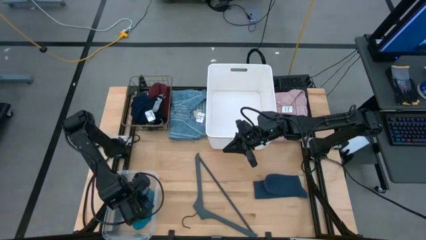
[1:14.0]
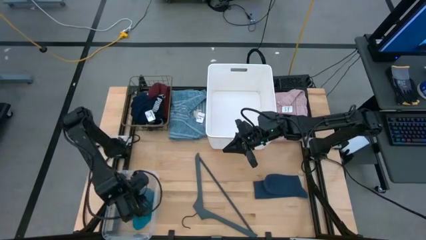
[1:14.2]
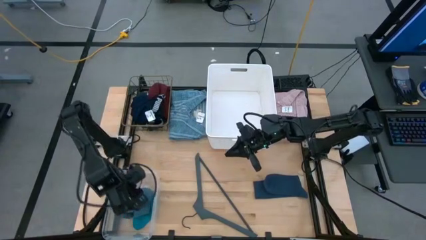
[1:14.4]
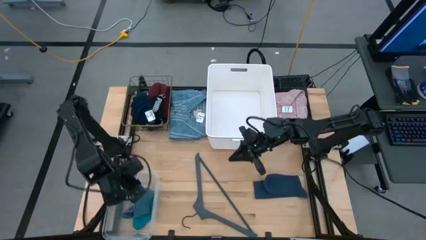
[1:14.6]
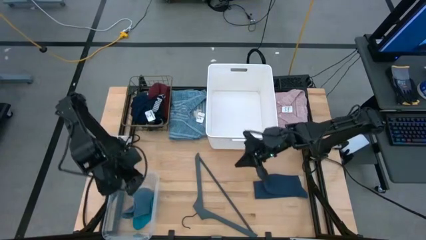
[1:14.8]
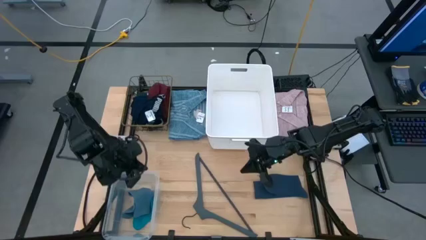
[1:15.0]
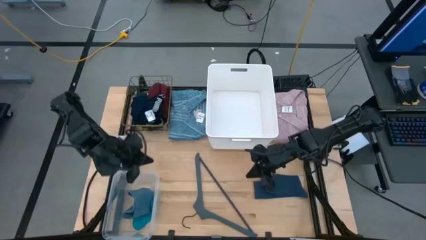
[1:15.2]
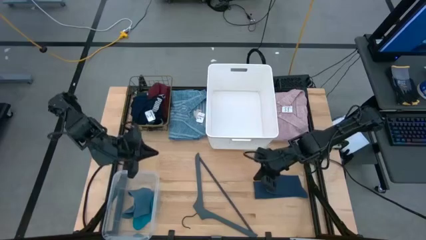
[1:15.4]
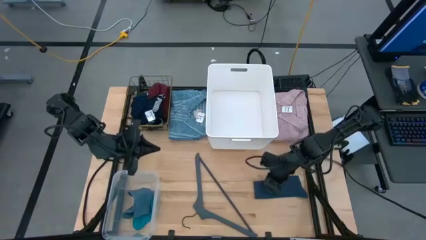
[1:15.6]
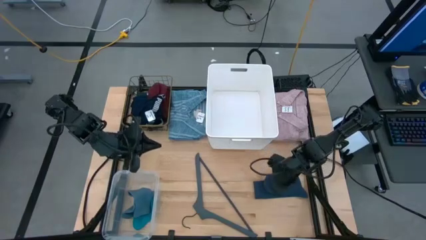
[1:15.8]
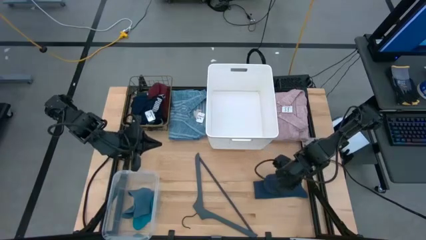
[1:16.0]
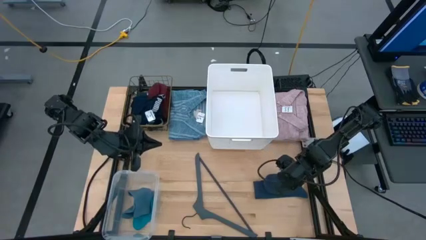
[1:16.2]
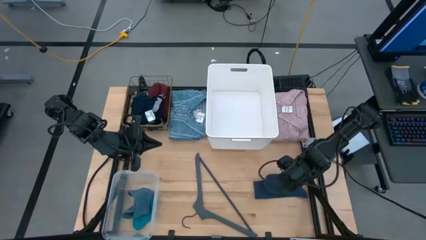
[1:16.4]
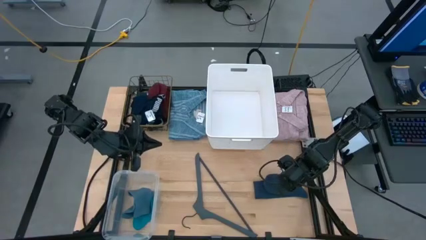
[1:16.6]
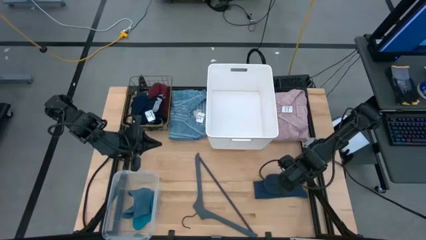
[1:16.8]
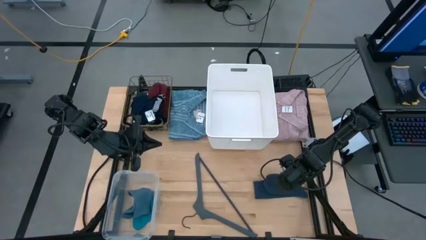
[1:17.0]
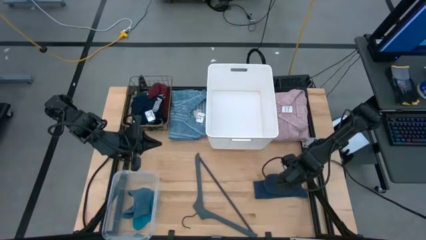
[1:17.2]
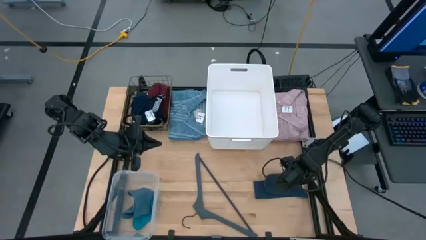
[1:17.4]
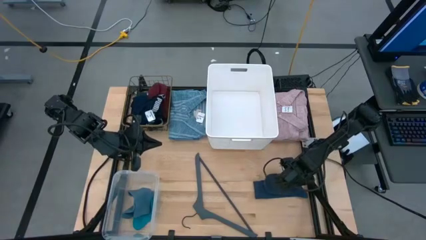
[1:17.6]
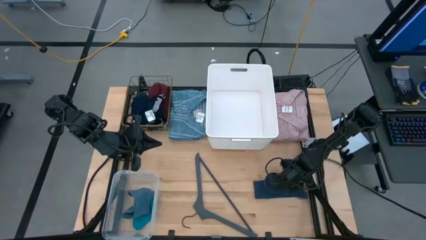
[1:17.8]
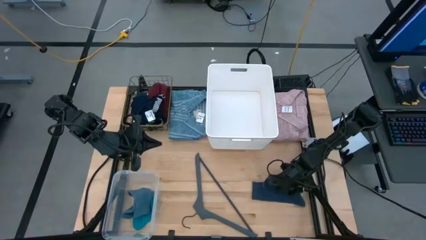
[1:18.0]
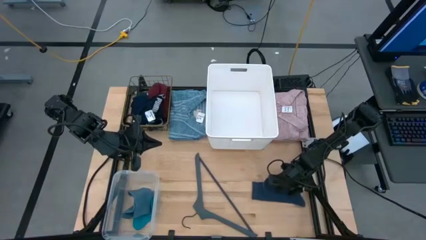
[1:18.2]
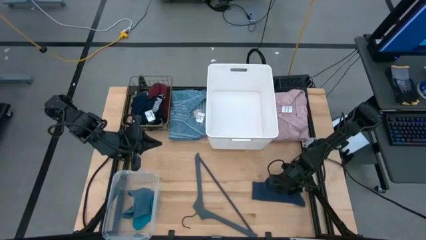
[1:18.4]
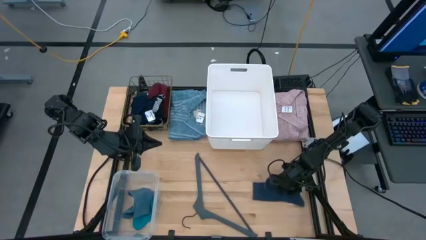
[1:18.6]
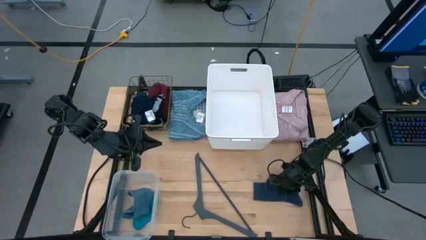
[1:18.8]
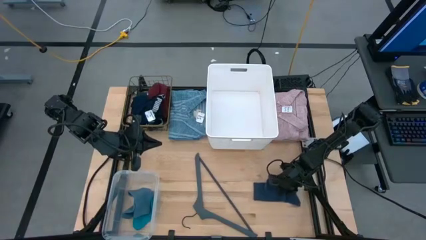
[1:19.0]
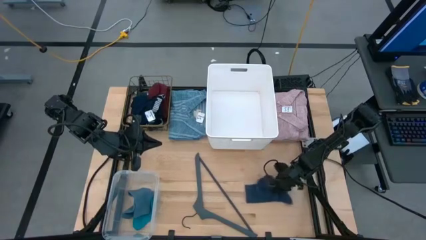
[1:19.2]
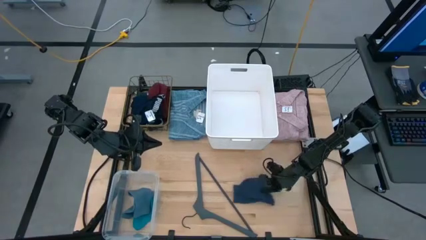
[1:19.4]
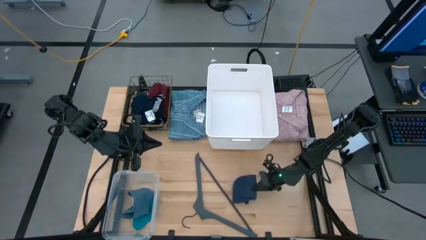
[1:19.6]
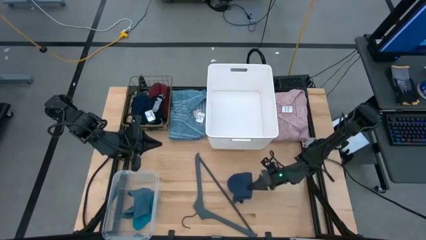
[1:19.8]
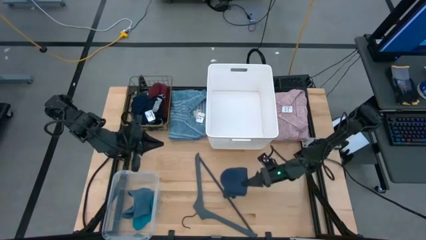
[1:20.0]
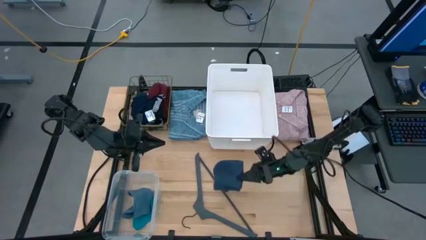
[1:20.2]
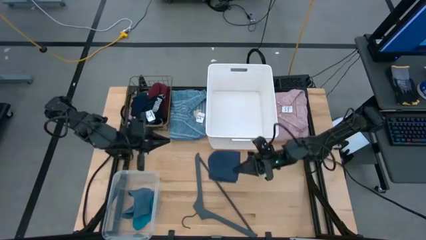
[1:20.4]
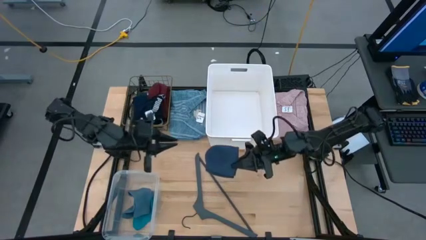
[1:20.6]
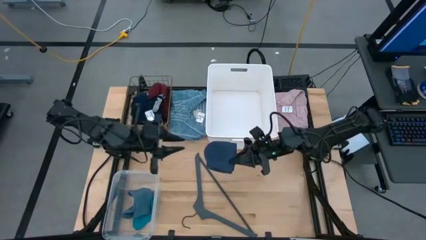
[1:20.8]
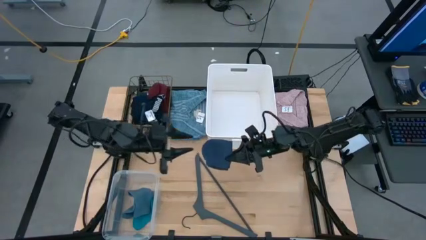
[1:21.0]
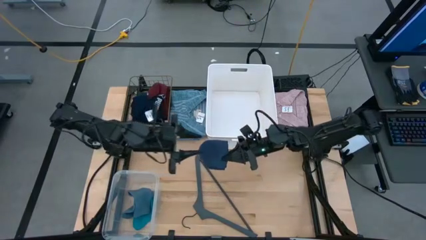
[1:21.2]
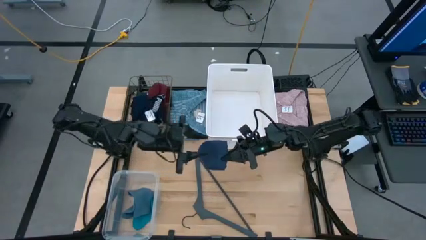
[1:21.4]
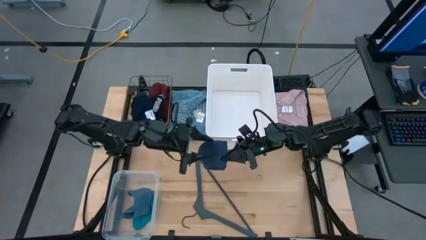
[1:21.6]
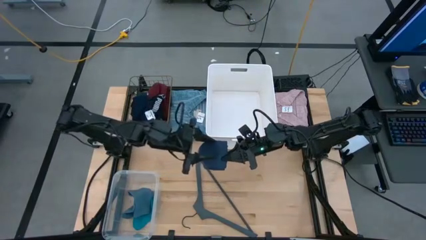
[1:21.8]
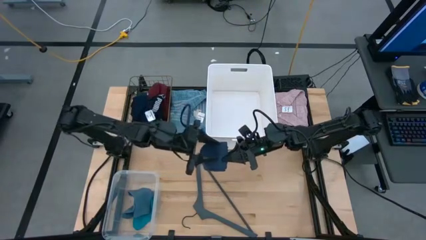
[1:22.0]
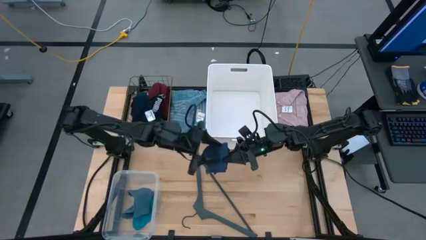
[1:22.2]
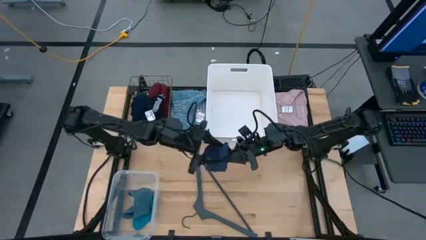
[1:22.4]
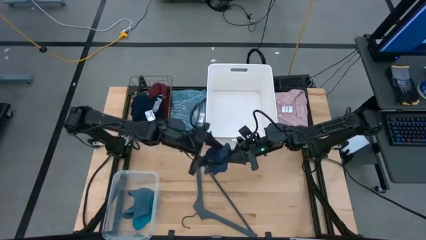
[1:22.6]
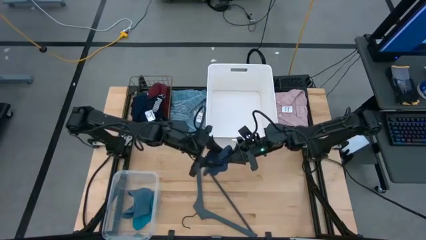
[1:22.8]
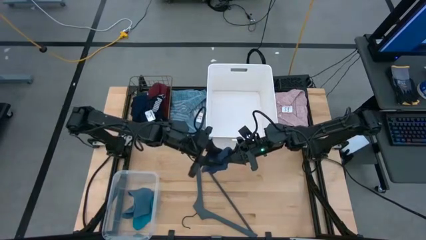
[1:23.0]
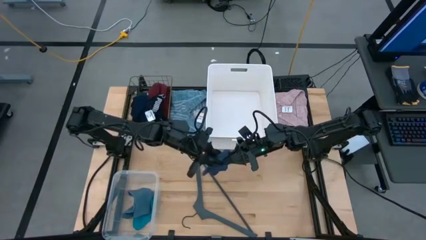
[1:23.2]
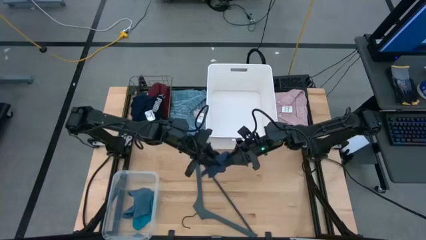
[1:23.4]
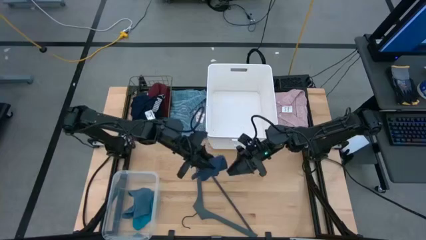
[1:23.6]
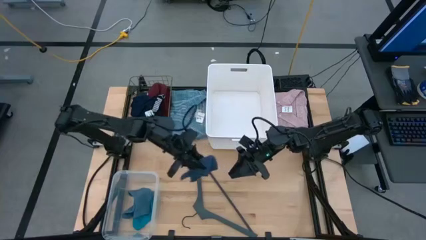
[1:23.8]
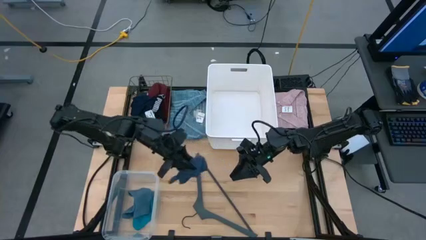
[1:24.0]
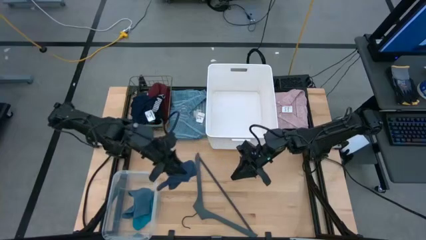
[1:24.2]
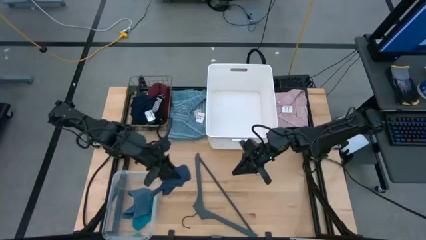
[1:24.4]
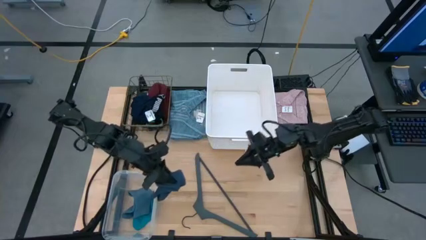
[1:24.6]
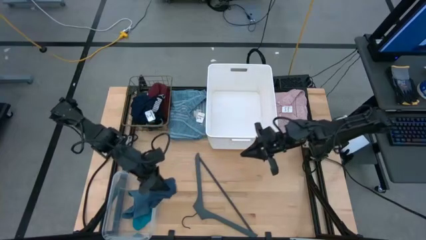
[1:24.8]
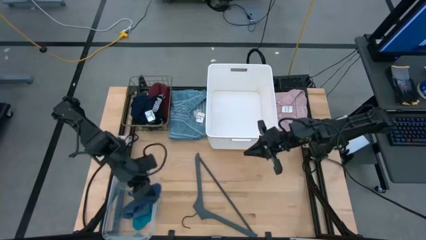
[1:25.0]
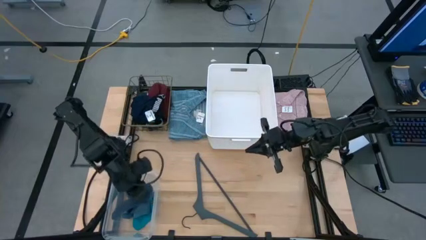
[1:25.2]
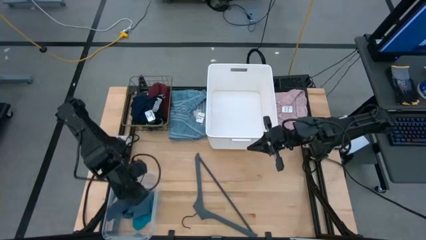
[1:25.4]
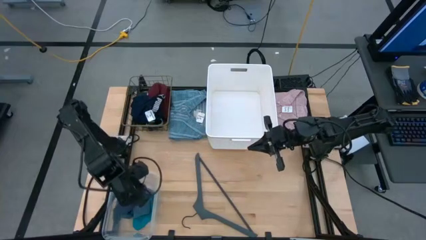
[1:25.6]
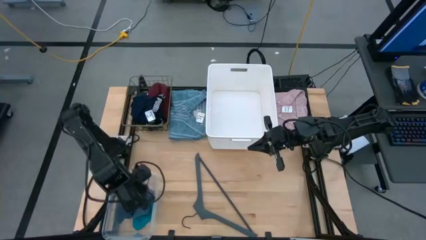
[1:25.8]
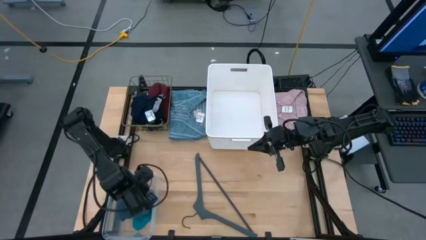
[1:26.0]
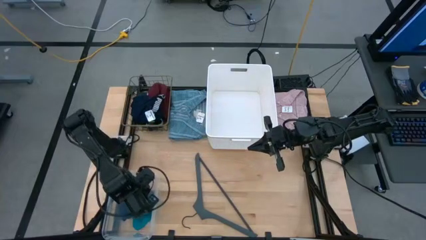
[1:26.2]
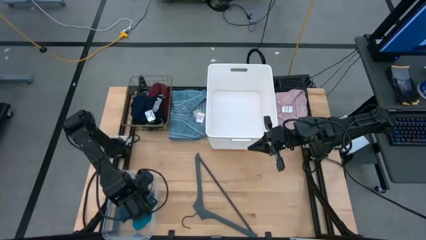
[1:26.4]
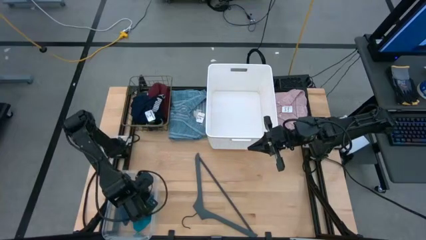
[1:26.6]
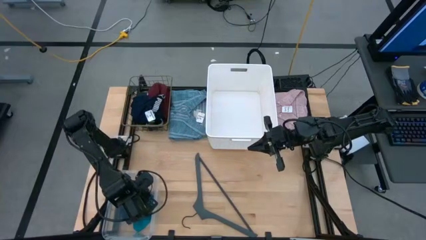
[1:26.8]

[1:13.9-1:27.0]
Task: Pick & Place Cloths
Put the blue sock into the transparent bin

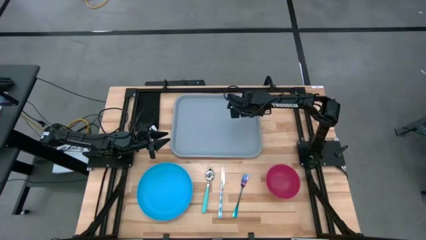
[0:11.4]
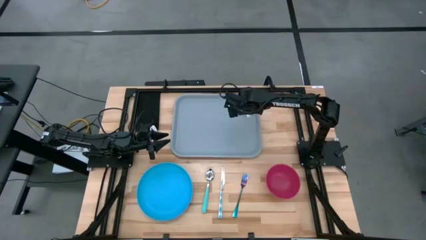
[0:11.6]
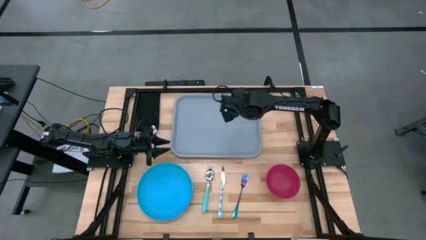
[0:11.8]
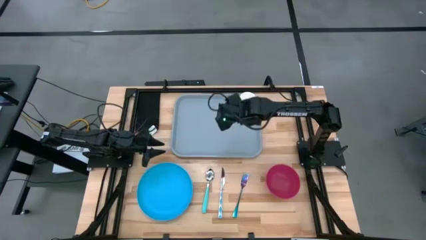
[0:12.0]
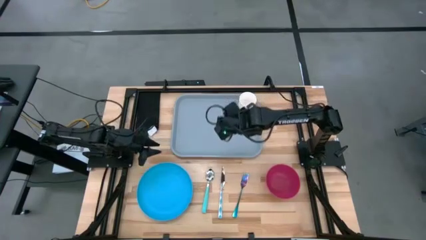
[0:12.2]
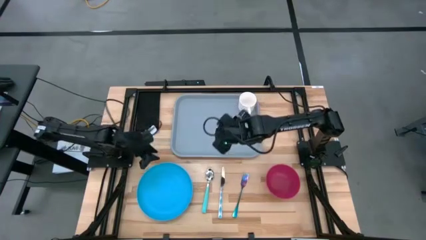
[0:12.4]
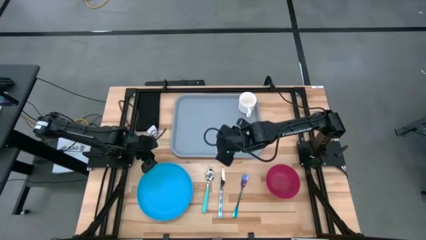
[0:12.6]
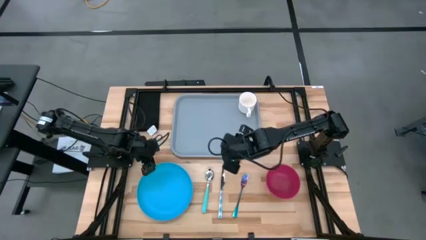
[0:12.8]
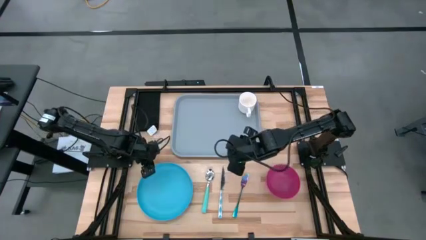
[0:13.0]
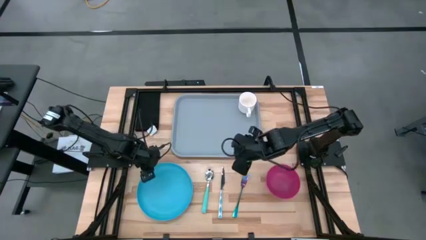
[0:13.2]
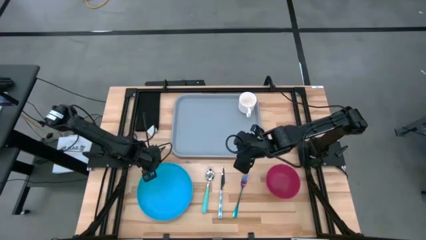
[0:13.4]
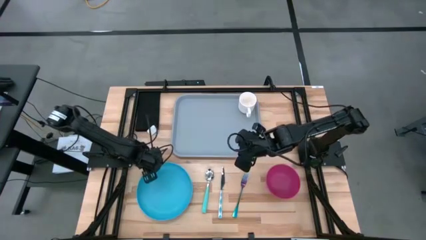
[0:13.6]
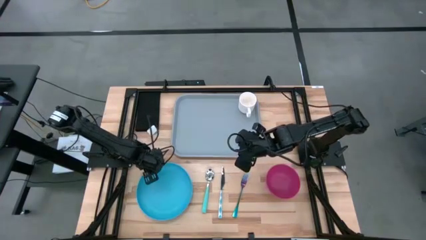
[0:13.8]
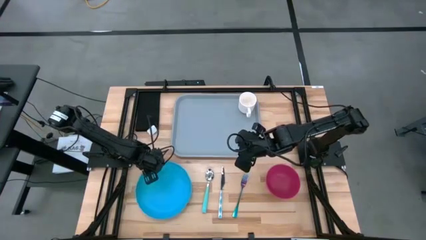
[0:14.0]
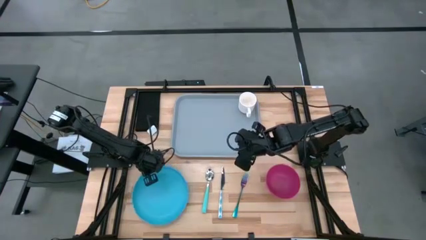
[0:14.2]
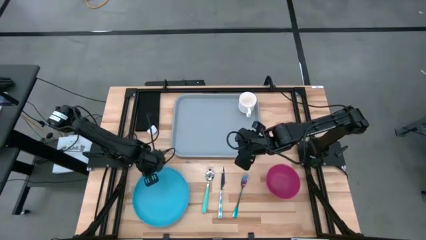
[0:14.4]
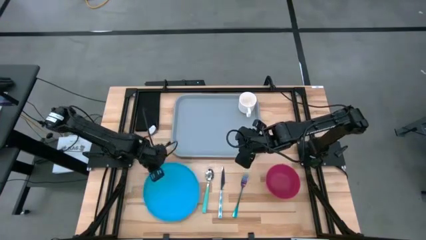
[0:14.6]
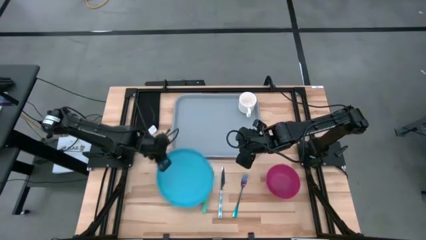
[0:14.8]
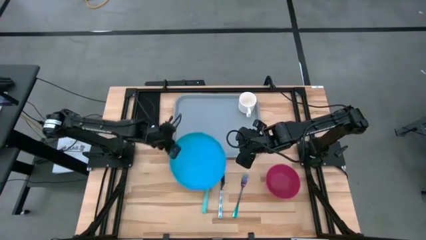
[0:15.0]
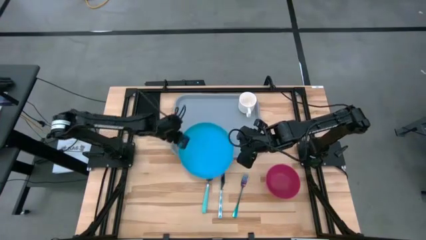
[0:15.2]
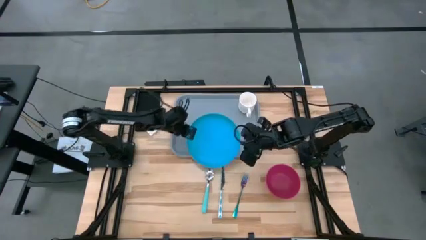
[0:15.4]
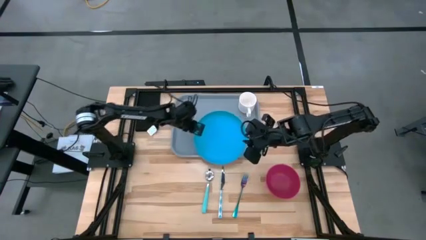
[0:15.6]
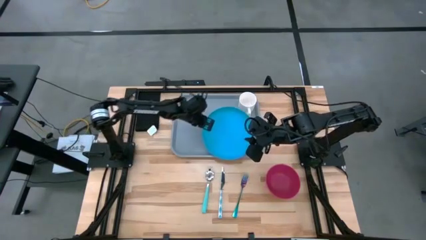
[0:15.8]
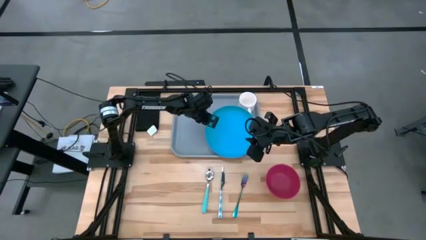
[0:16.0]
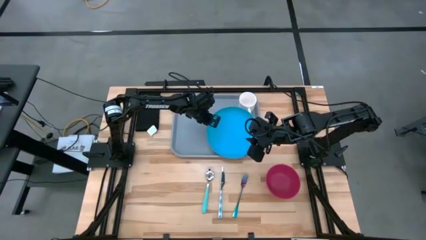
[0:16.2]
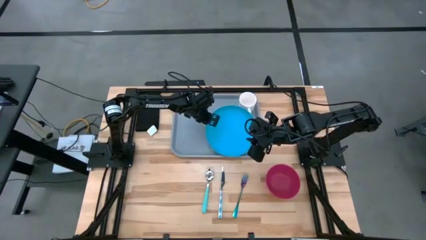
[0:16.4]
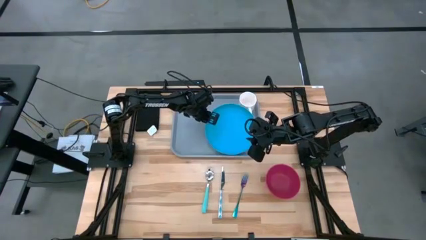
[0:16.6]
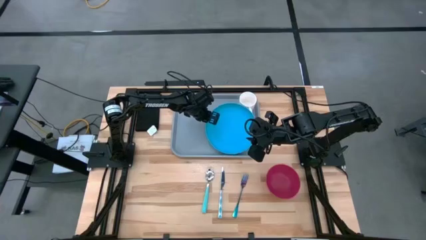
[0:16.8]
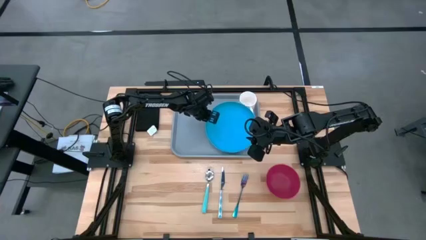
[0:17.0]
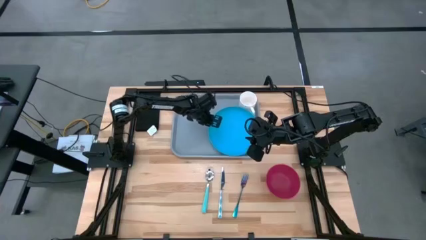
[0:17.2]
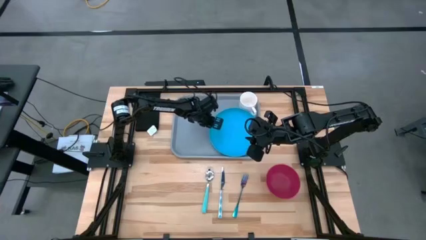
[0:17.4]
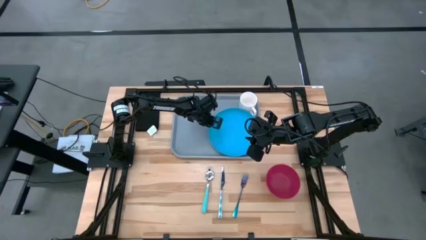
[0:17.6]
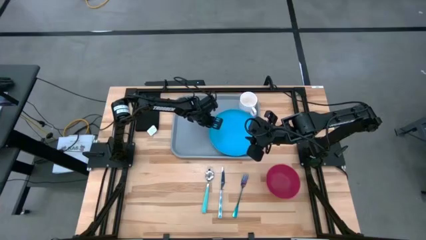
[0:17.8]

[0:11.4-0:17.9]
Task: Set up tray
Put the blue plate on the gray serving tray below the white cup
